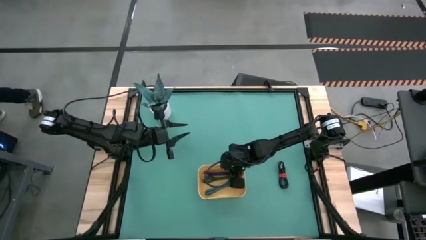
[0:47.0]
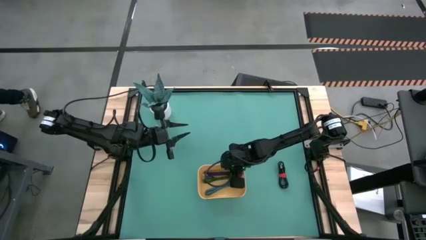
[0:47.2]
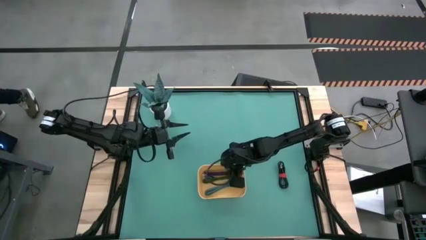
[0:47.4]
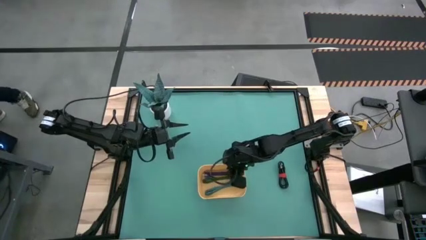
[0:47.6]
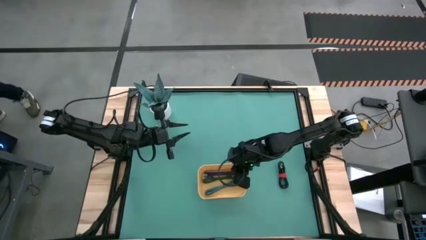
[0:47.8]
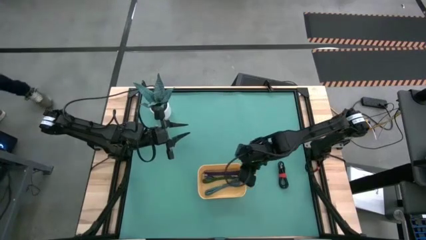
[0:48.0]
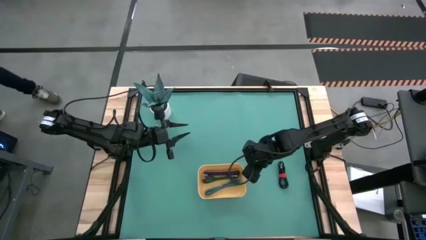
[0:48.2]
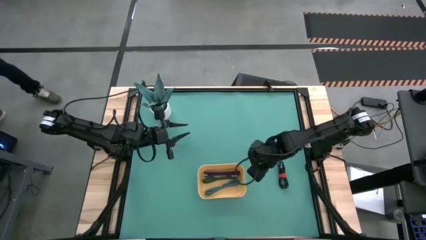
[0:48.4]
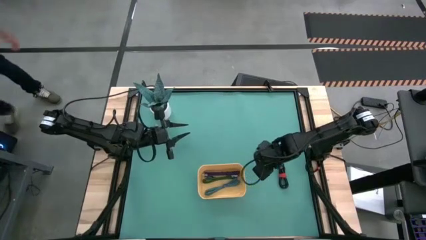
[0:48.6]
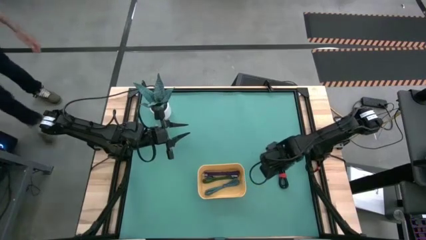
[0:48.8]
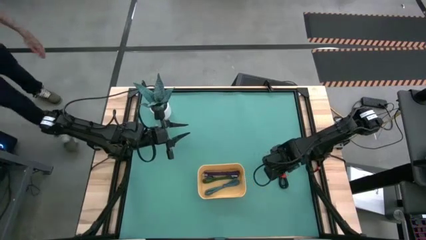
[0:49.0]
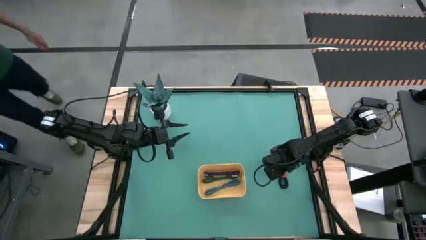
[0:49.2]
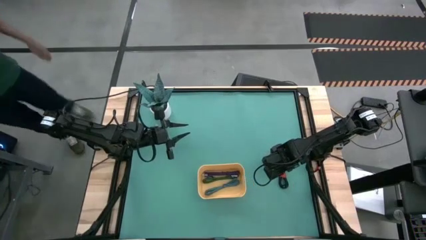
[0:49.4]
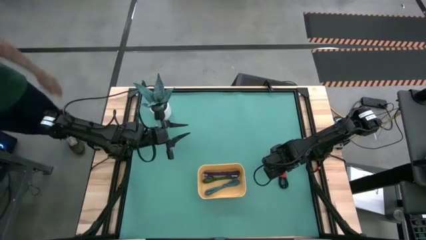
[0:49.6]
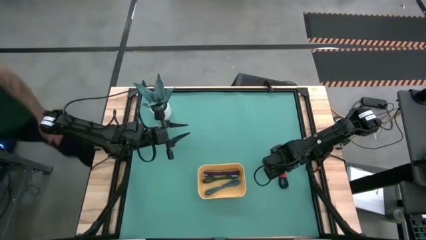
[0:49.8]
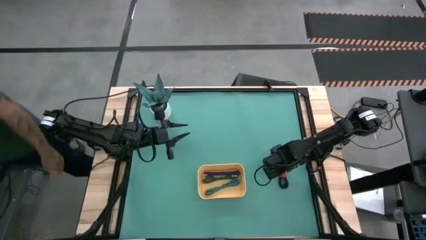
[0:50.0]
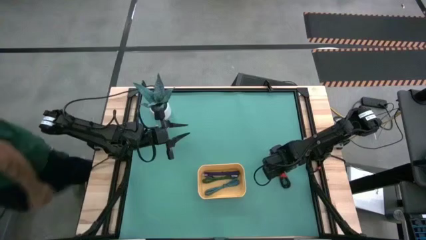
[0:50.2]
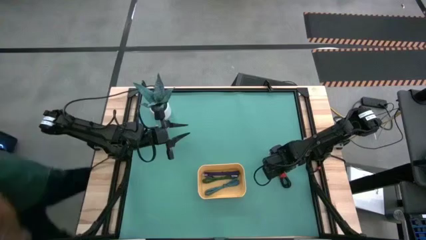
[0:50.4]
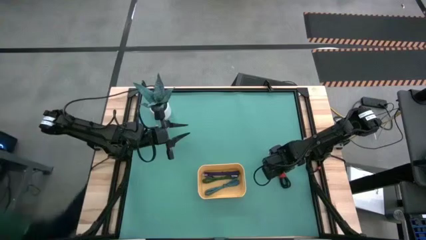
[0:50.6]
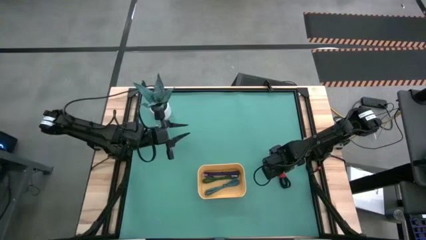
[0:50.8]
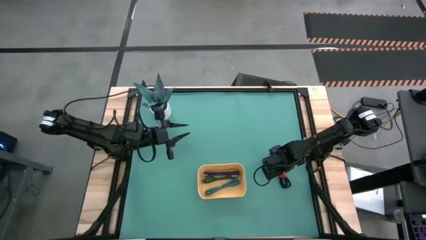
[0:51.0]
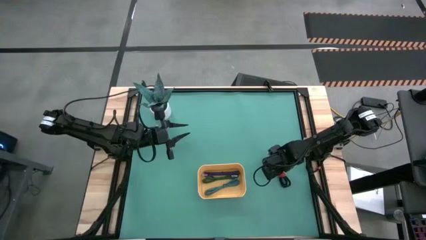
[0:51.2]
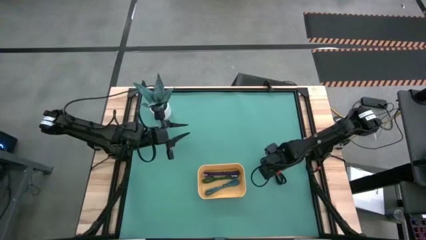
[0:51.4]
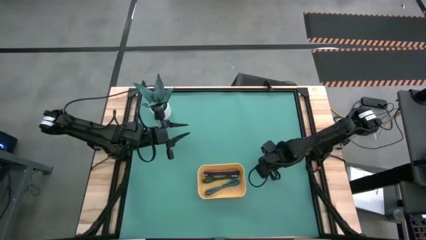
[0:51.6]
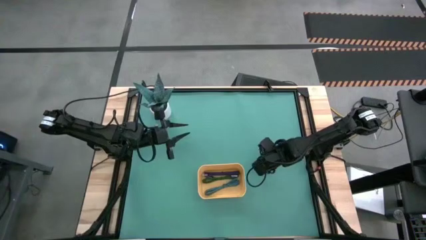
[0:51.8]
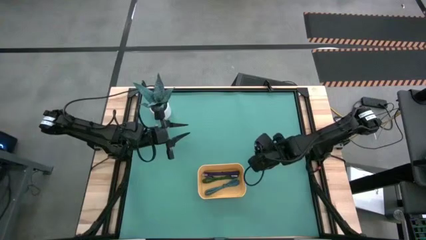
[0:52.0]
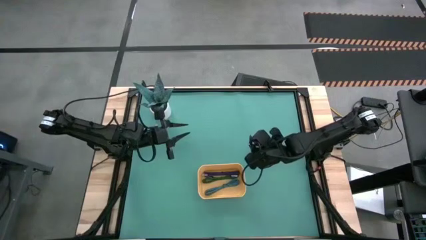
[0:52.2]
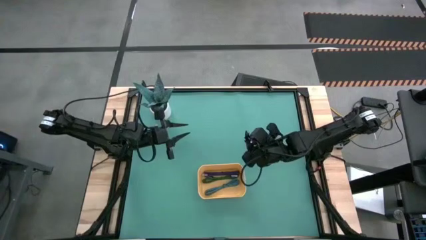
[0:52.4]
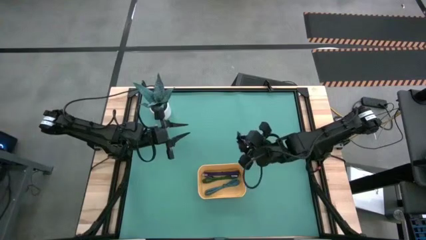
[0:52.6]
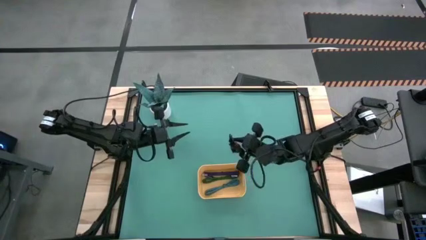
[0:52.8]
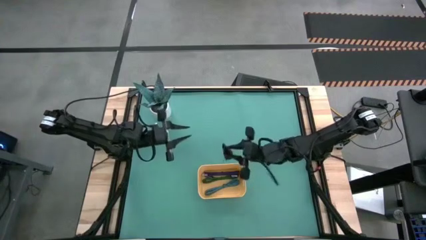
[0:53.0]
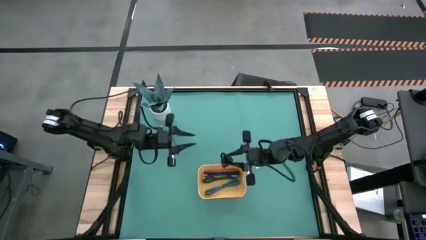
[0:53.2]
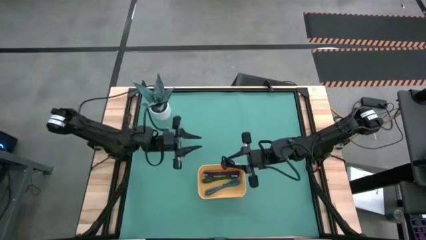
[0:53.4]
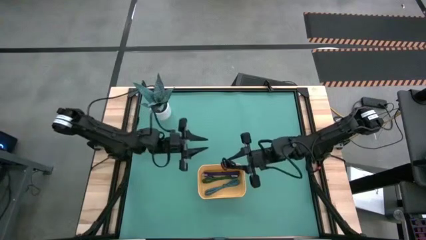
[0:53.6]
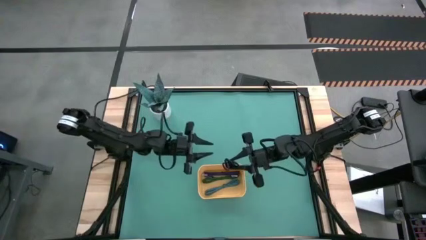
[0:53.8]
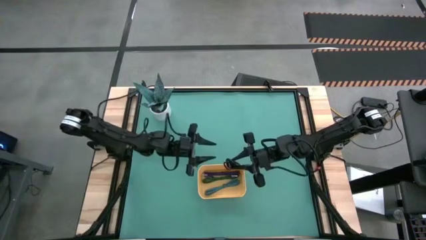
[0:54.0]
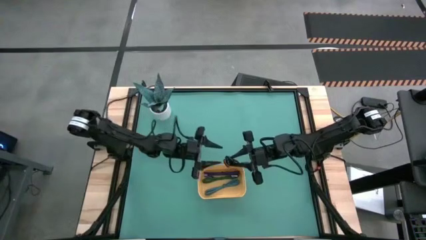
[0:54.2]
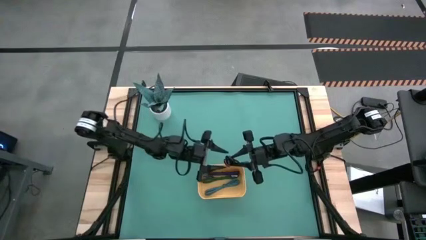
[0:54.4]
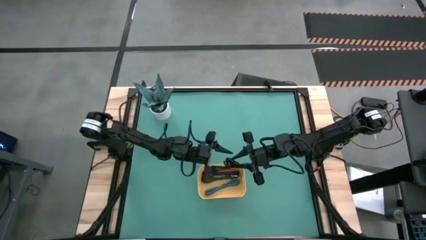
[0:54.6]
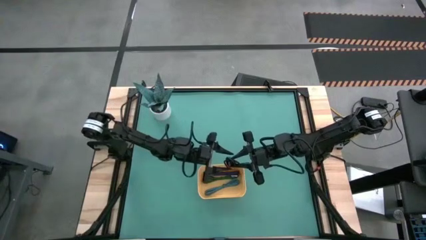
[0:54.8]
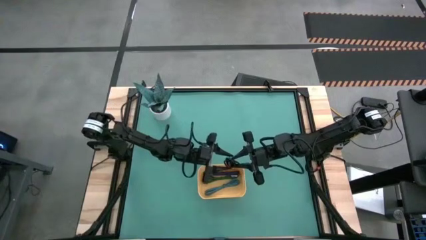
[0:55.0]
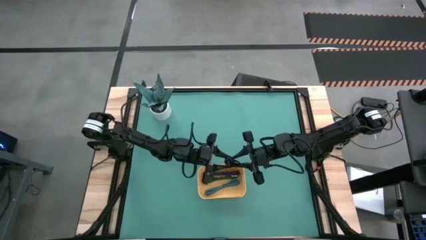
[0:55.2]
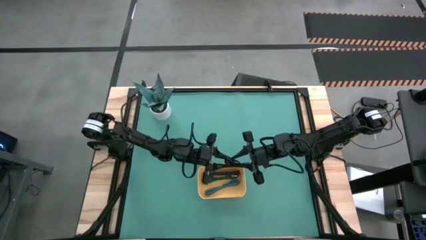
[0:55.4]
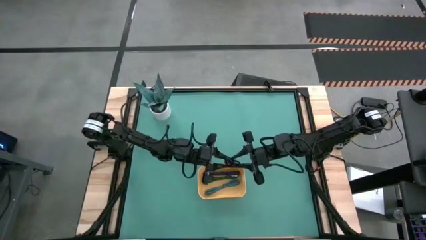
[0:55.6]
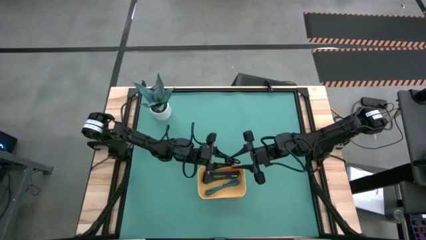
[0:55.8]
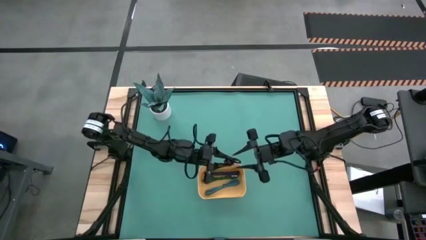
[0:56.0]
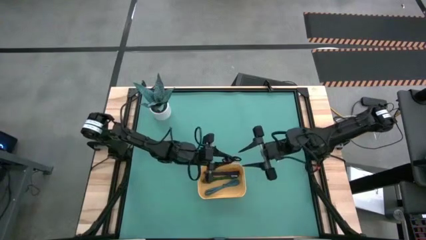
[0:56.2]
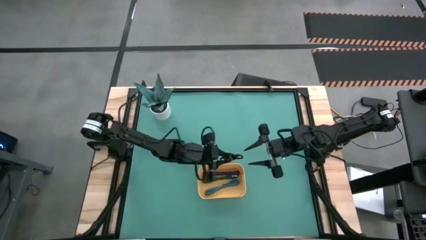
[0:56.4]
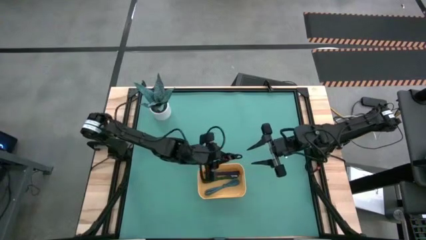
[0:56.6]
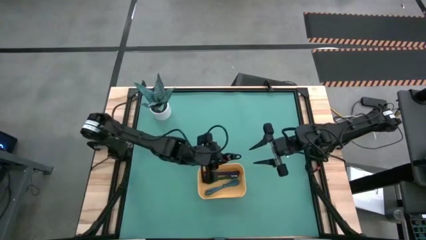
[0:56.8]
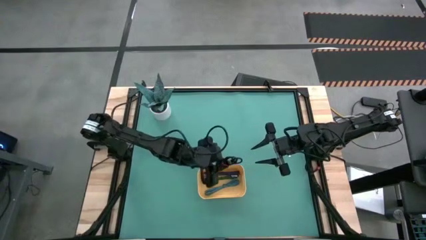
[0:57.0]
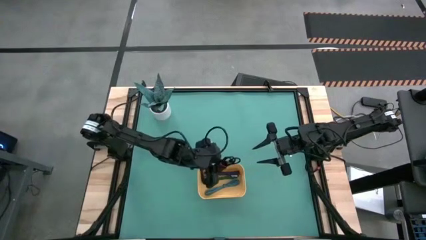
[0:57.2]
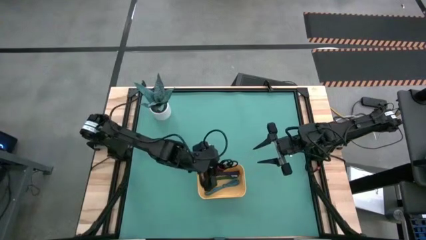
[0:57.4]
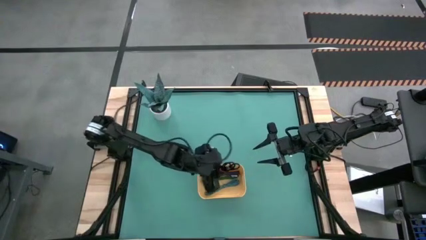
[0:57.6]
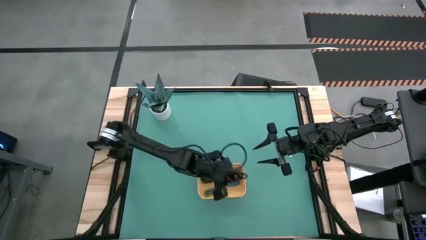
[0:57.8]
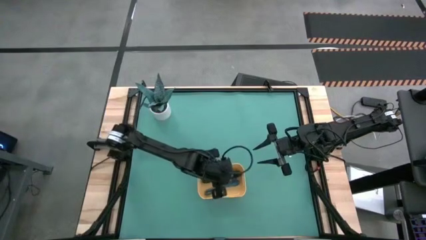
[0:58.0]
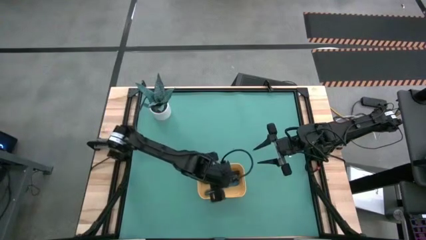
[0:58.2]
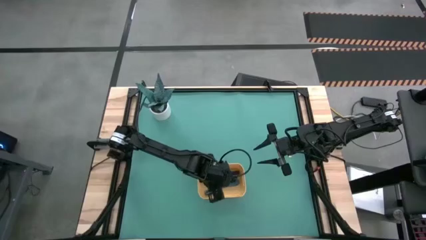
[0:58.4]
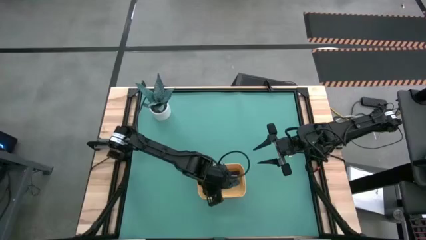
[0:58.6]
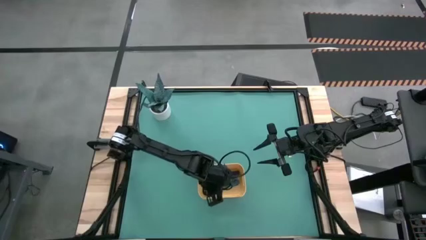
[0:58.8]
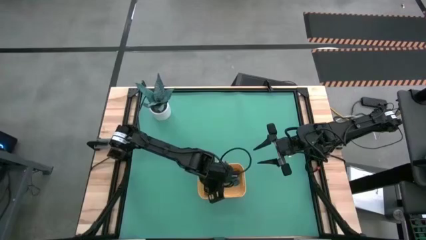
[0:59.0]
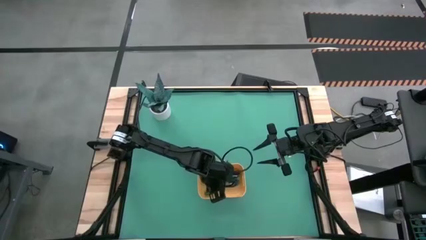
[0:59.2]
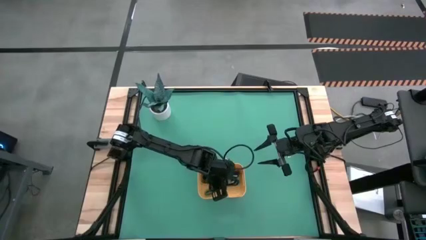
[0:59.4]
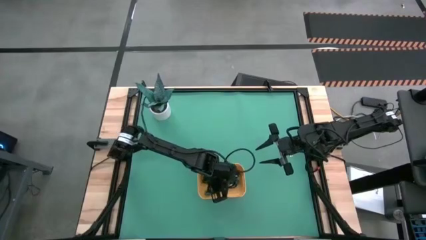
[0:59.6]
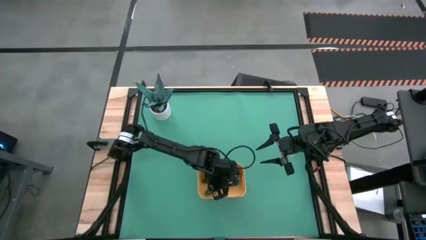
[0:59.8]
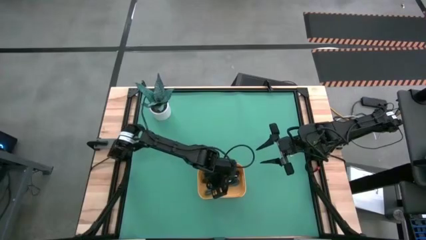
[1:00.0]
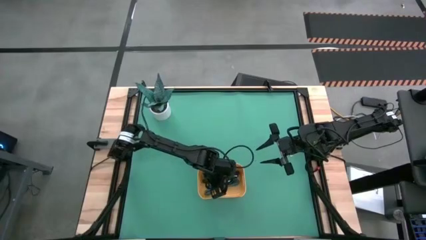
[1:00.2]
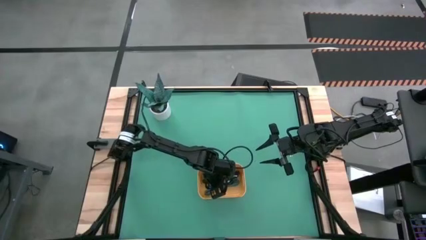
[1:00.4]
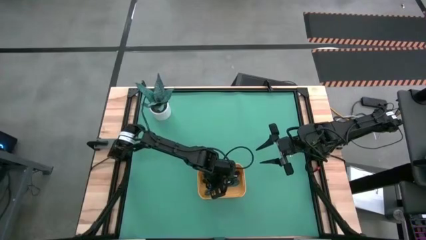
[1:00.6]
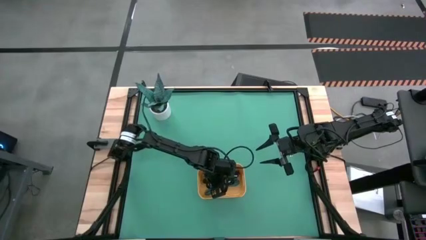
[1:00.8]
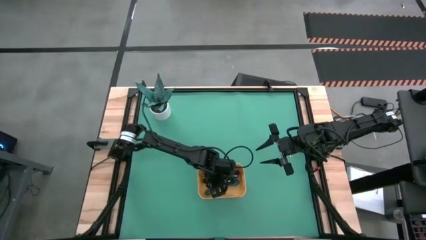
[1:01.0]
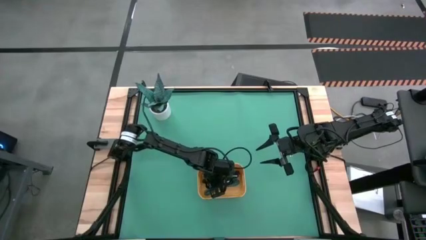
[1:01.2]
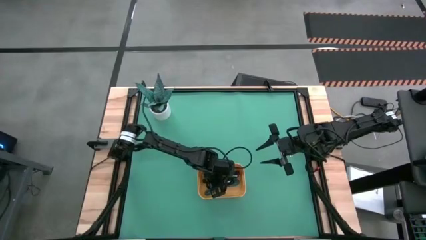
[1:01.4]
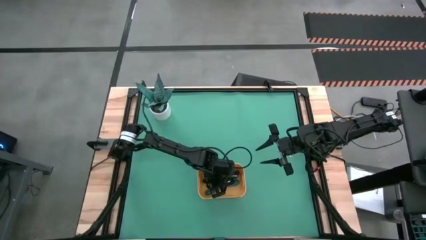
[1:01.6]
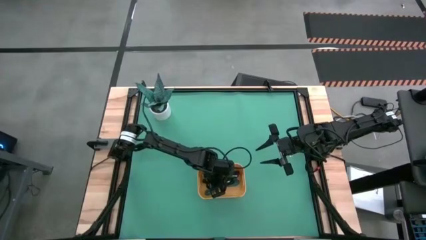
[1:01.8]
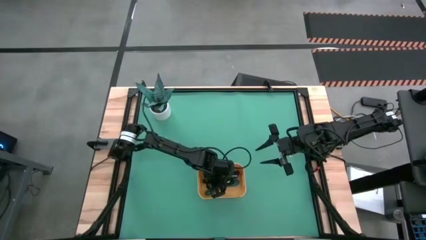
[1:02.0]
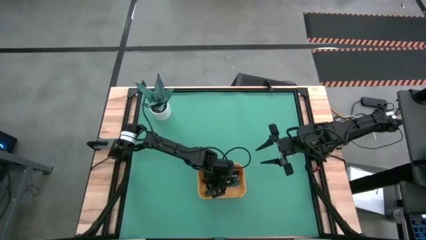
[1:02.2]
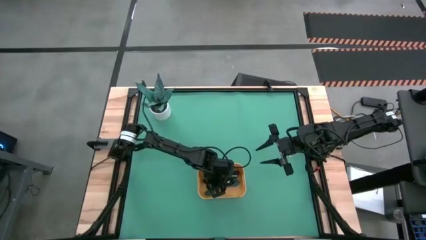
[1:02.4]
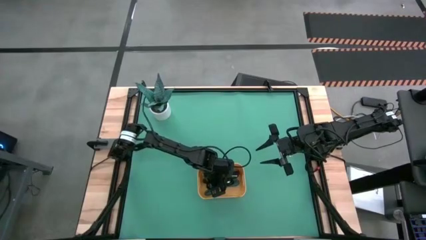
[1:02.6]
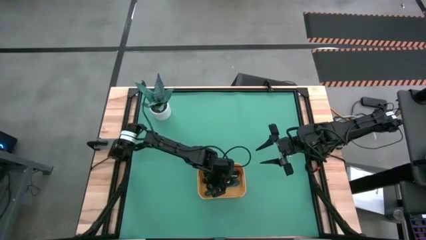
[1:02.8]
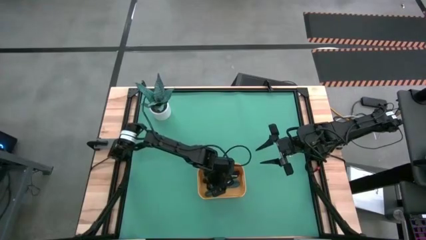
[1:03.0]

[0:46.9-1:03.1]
Task: Pick and place USB-C Cables
Put the black USB cable into the yellow bin
